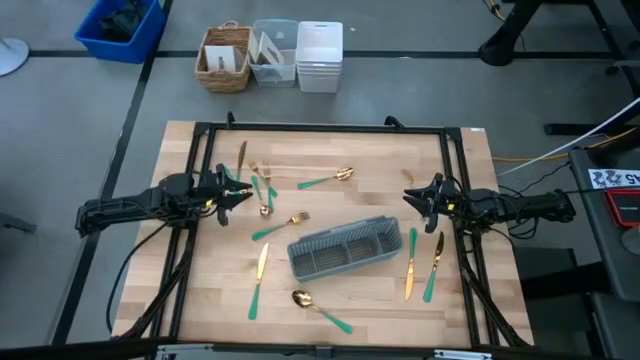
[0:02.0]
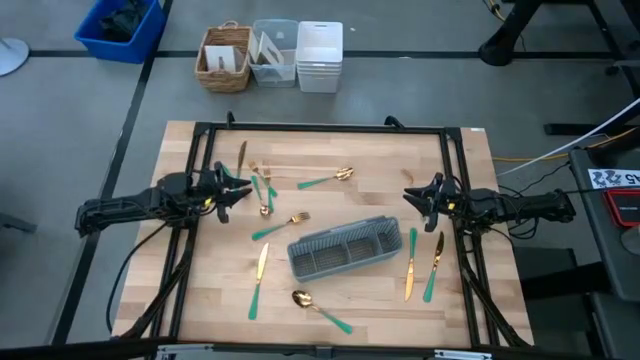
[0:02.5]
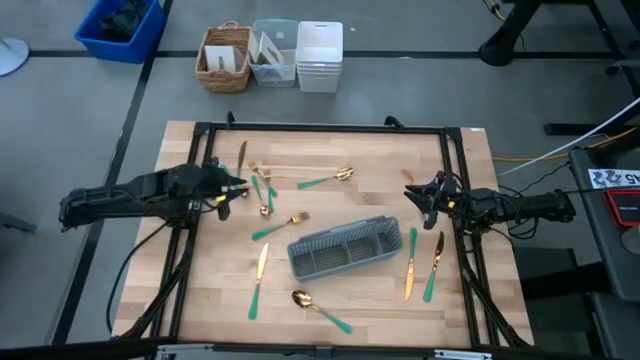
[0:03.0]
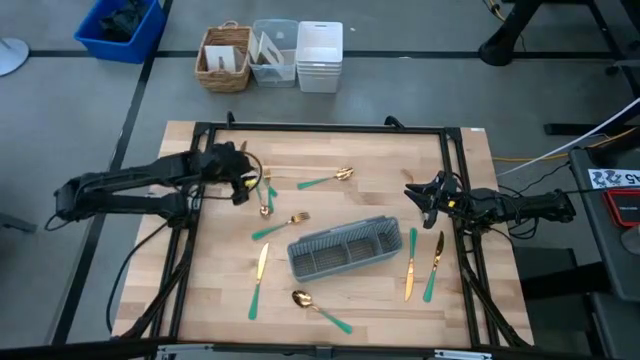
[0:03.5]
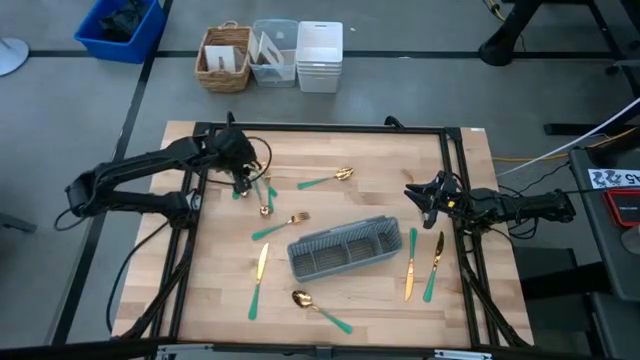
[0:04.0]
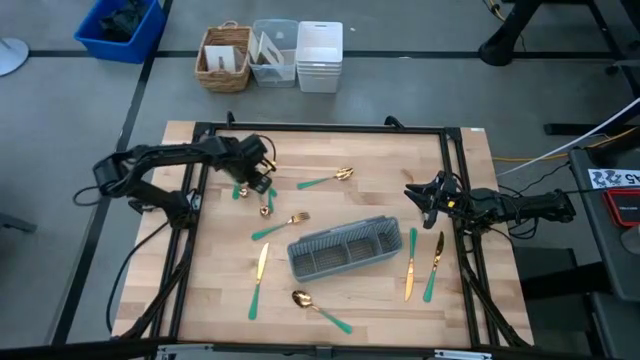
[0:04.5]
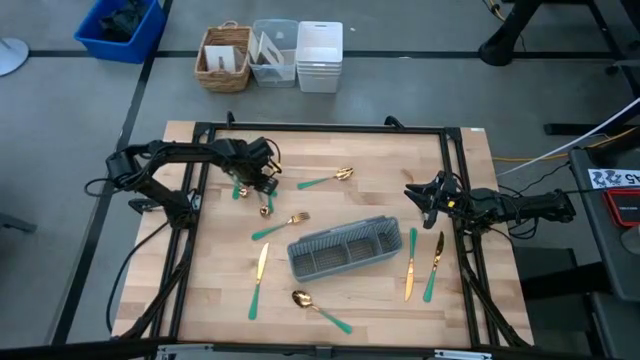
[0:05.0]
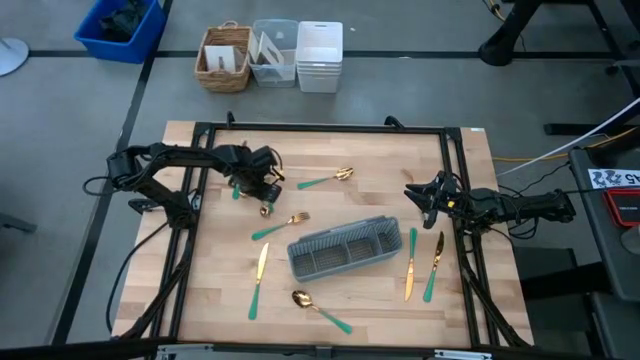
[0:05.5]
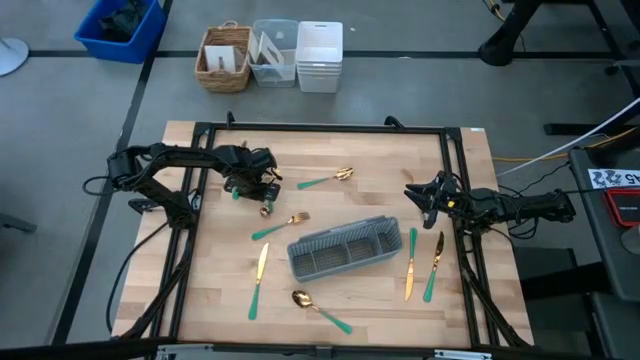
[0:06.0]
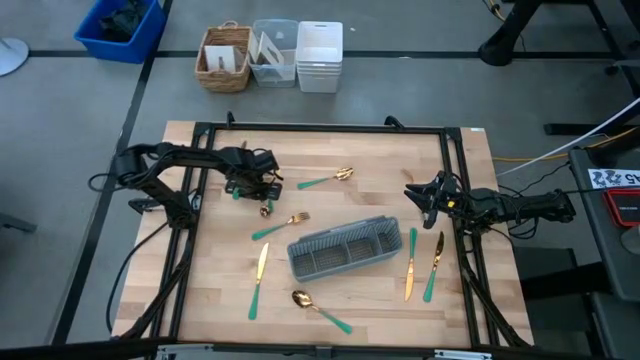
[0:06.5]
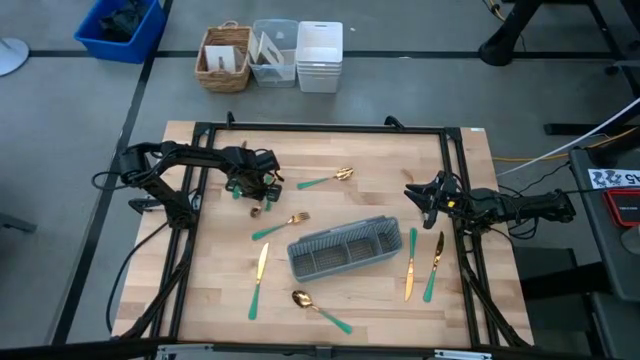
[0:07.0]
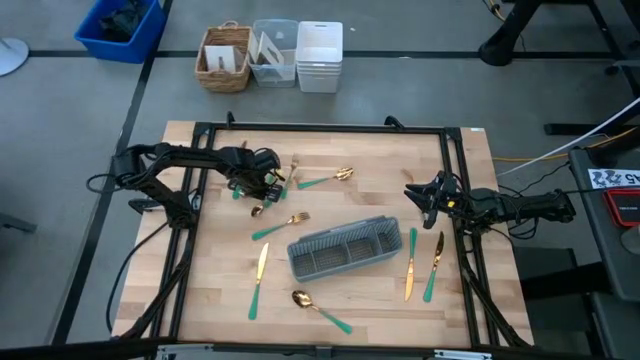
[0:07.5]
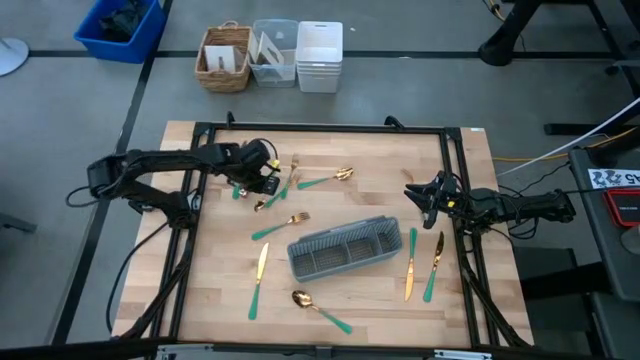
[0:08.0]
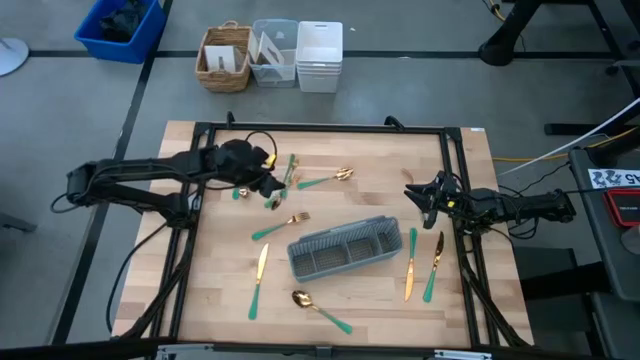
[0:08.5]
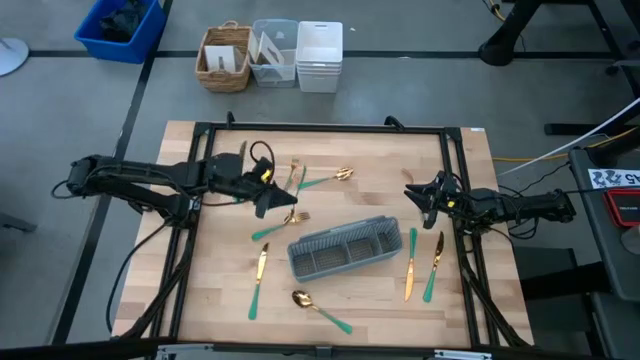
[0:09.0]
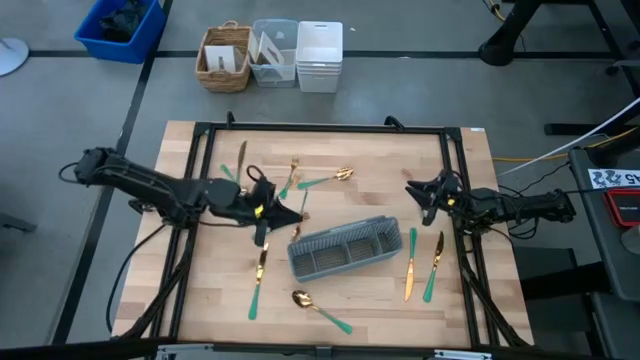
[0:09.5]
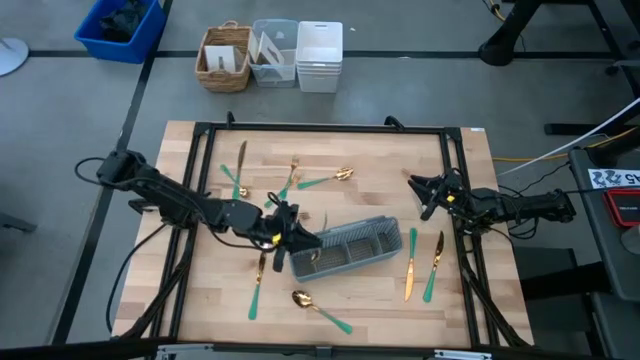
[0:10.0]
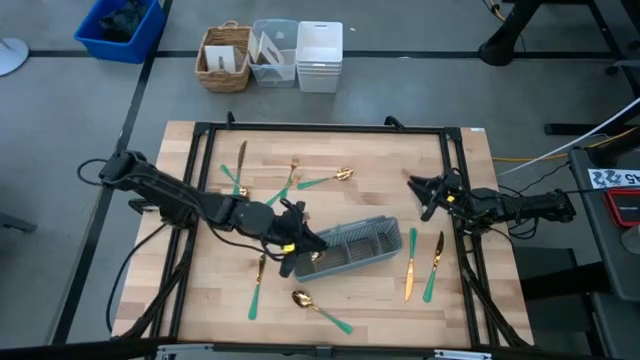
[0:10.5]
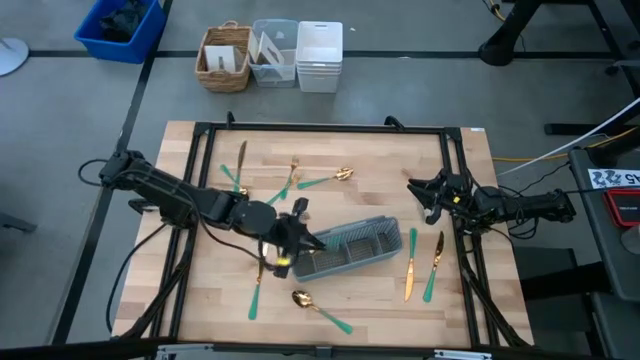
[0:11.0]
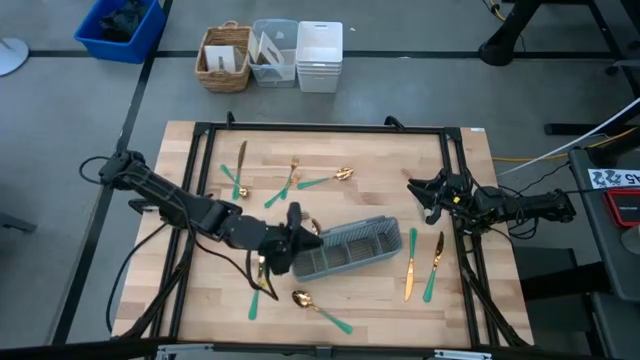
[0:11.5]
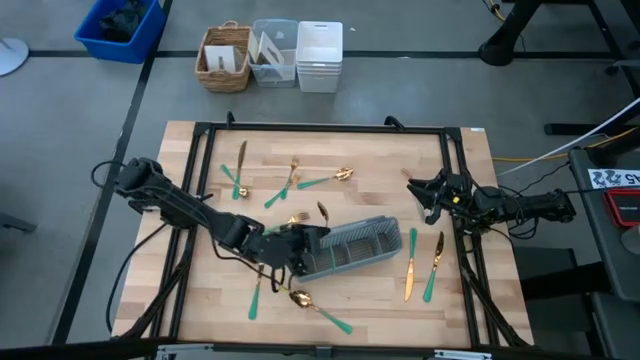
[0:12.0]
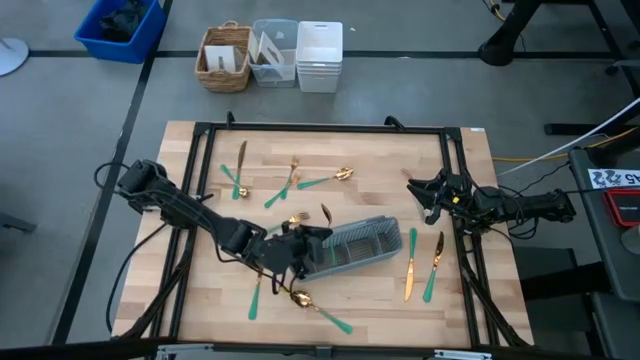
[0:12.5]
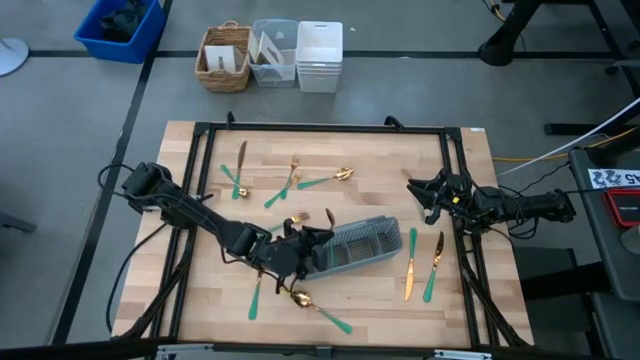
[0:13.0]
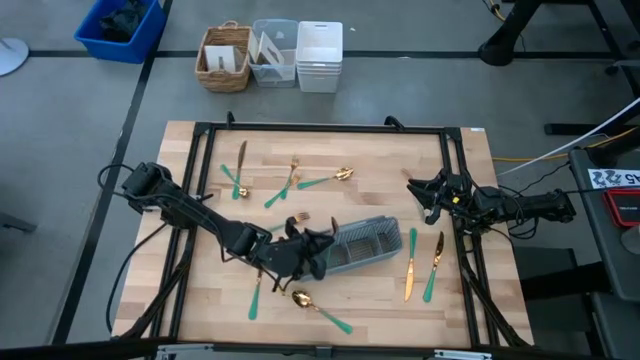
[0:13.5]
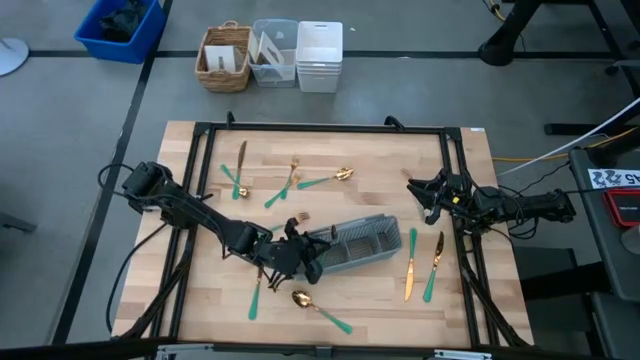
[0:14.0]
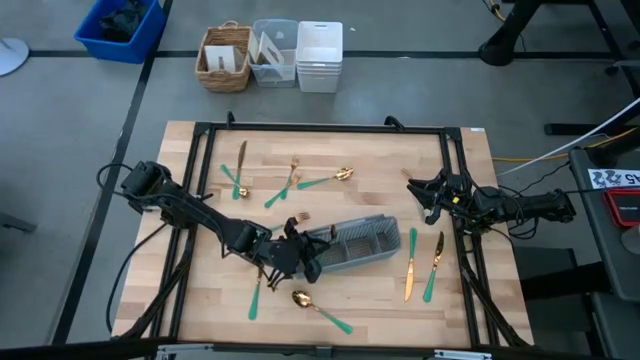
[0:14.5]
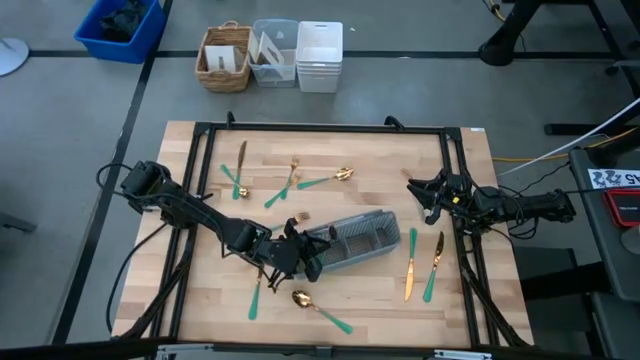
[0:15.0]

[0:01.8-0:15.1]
Task: Sort silverware
Put the gold spoon into the gray silverware organizer

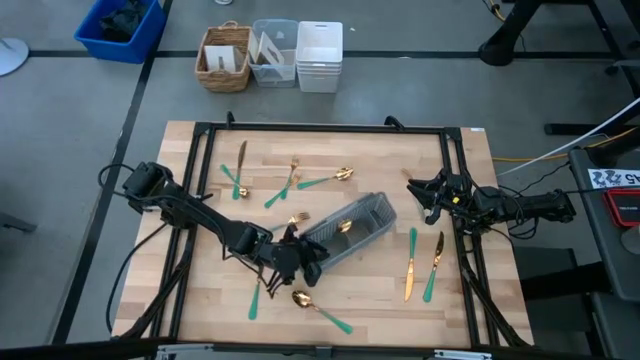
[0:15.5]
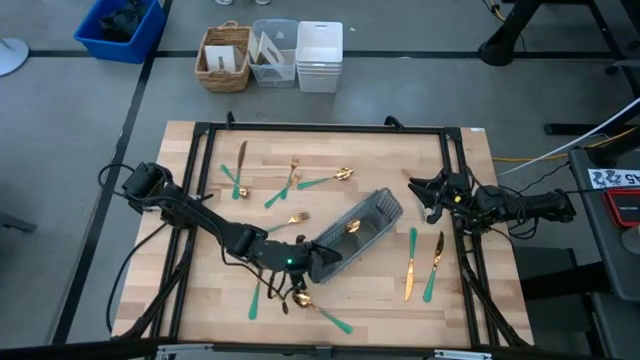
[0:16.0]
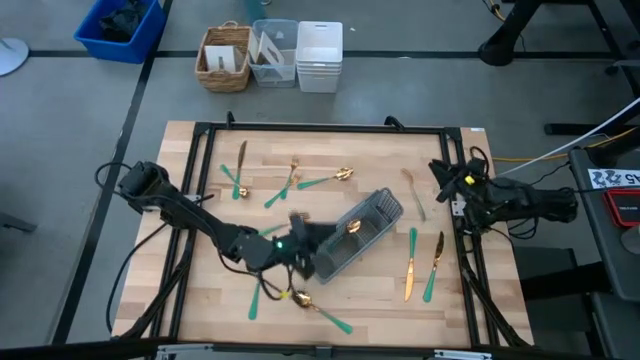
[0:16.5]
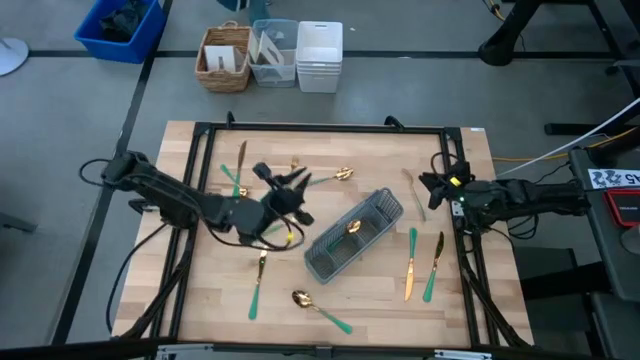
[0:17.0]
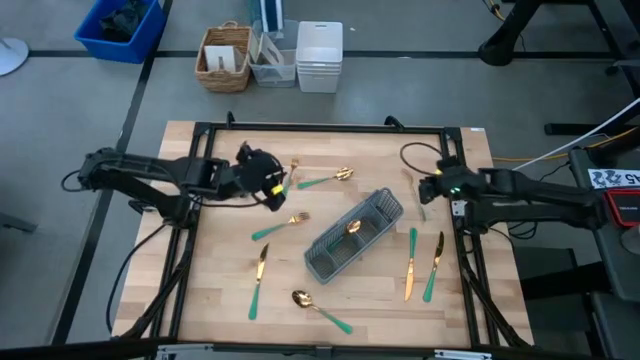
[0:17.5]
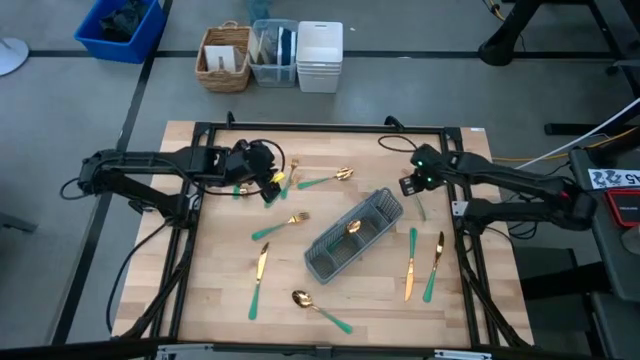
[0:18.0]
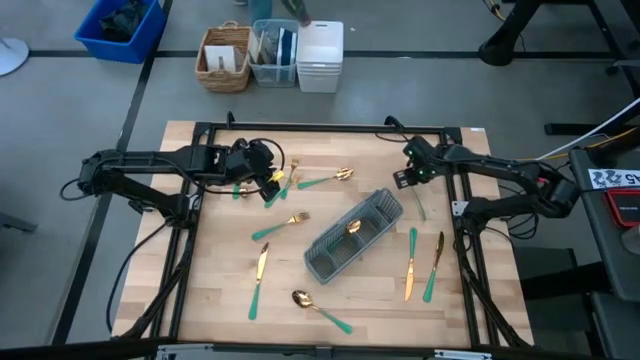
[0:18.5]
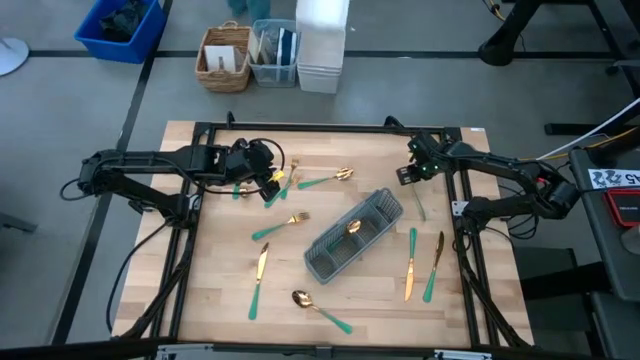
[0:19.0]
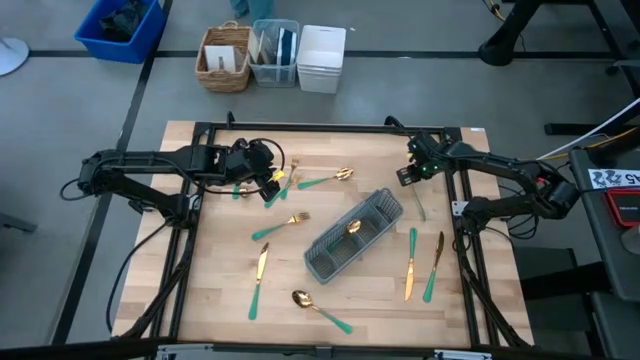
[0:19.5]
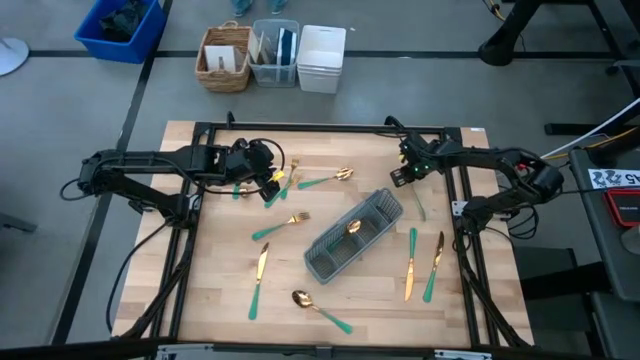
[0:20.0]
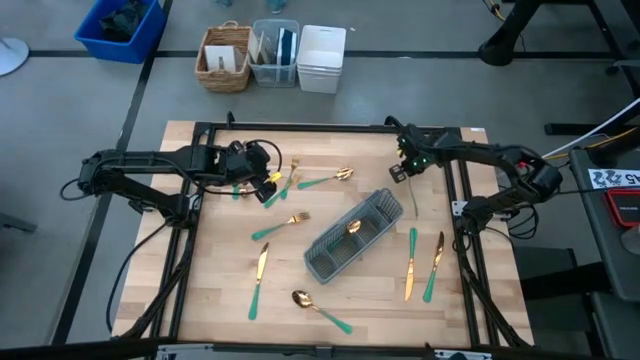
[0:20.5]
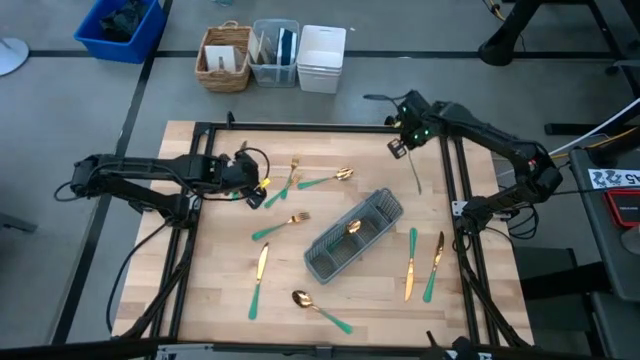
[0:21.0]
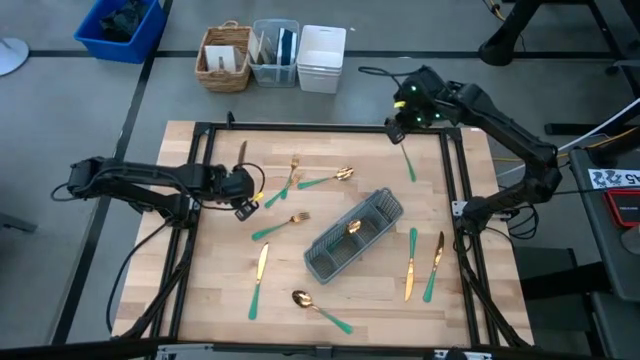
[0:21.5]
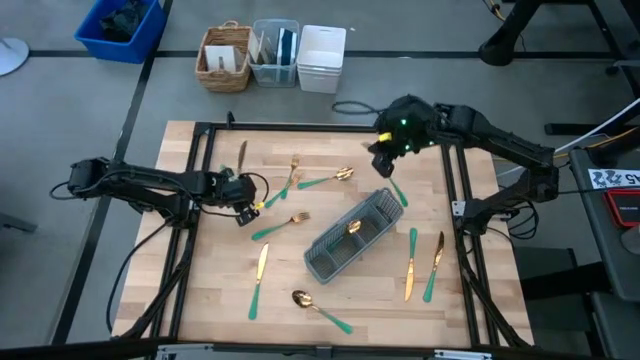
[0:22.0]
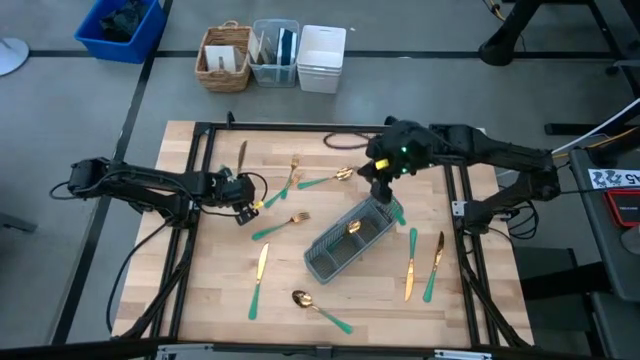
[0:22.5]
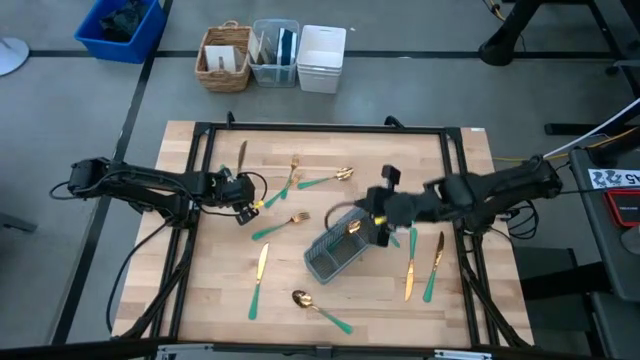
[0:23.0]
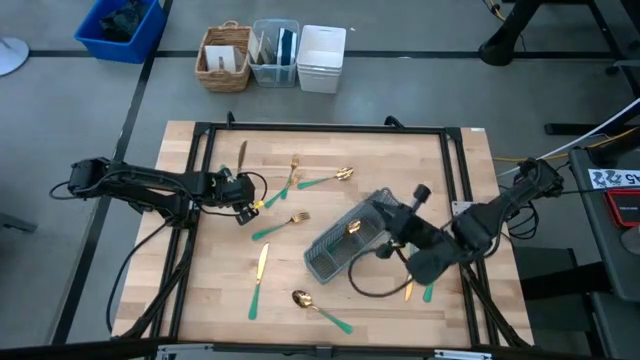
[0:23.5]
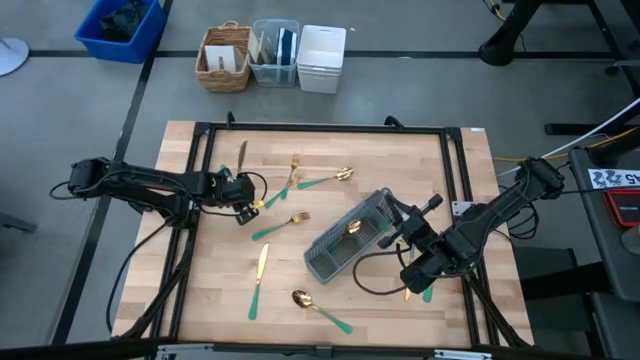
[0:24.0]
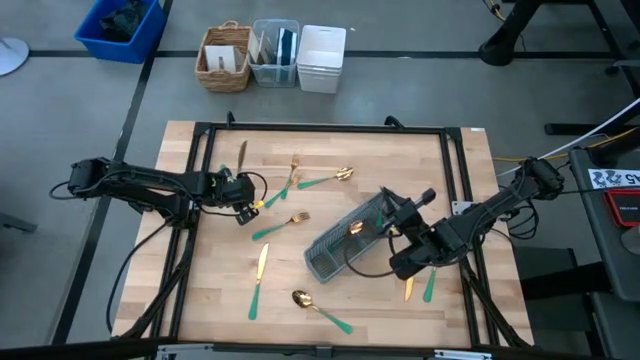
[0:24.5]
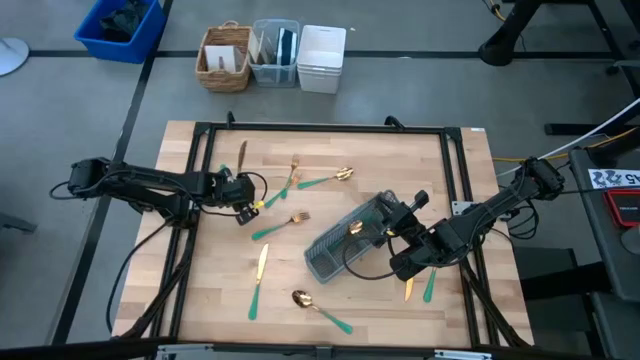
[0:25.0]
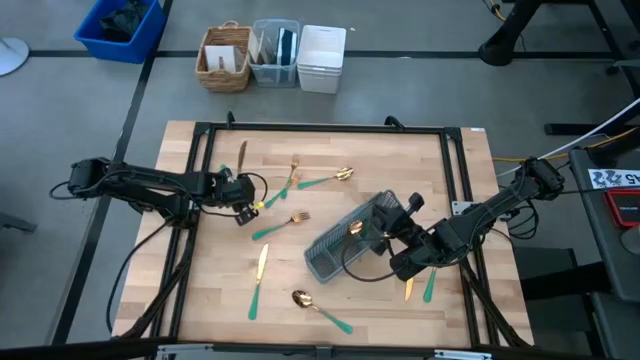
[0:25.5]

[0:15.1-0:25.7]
Put the gold fork into the gray silverware organizer
